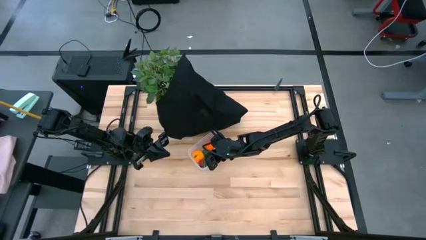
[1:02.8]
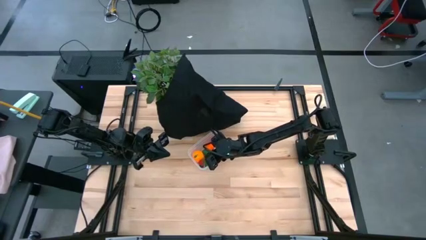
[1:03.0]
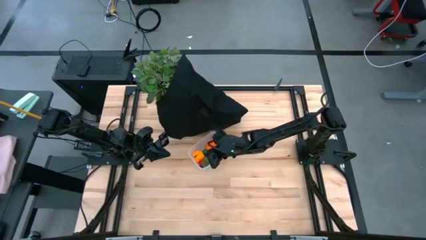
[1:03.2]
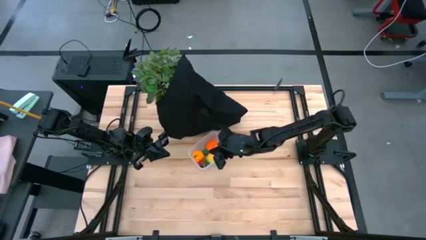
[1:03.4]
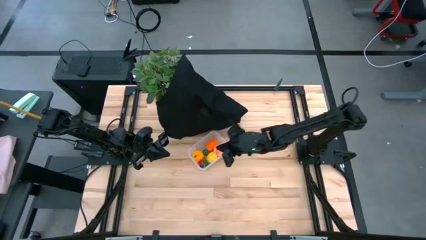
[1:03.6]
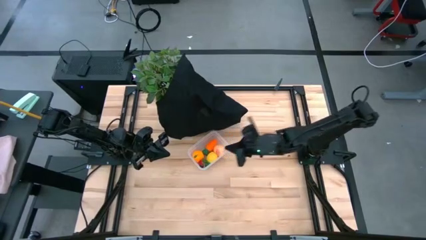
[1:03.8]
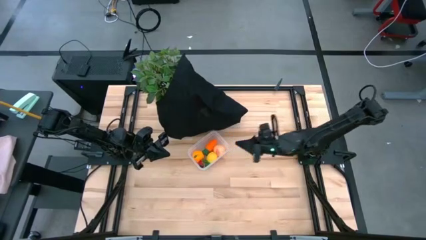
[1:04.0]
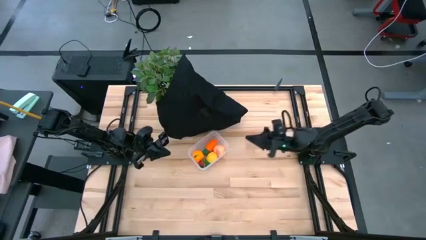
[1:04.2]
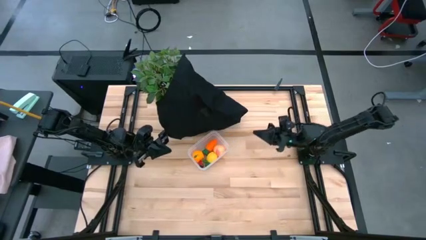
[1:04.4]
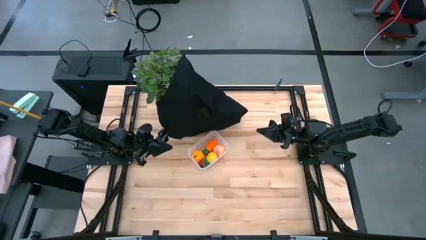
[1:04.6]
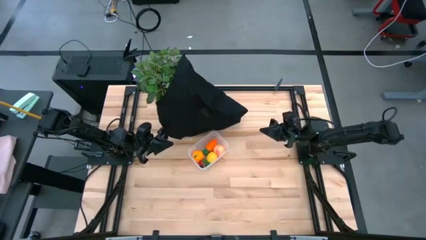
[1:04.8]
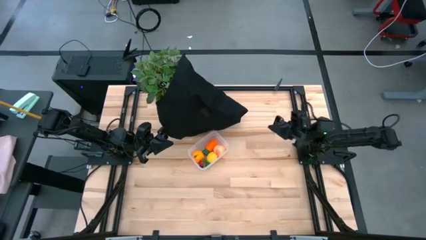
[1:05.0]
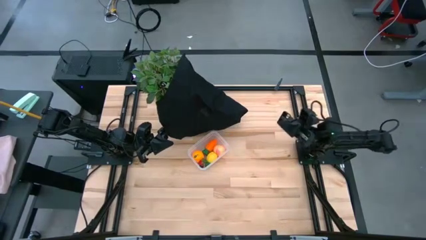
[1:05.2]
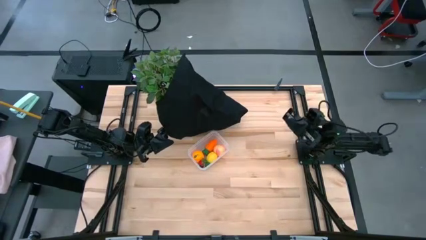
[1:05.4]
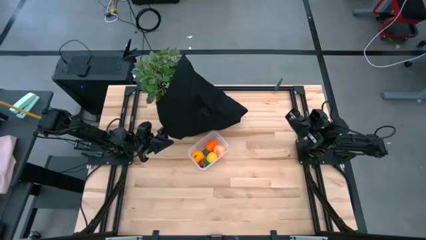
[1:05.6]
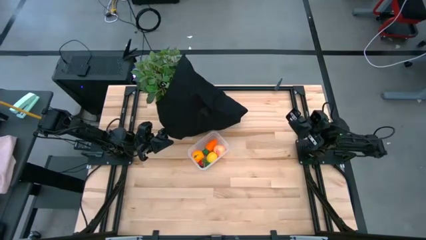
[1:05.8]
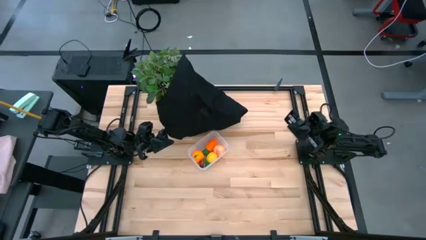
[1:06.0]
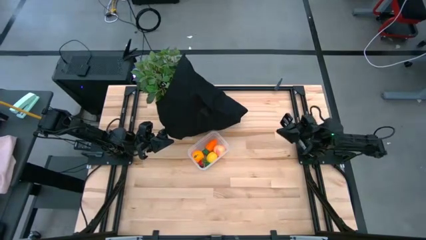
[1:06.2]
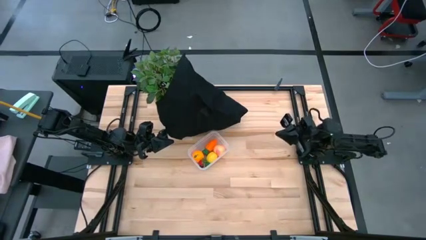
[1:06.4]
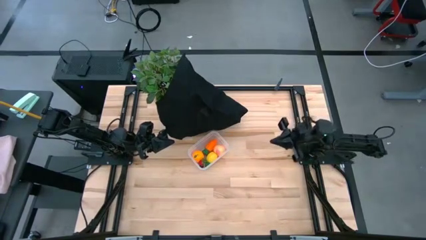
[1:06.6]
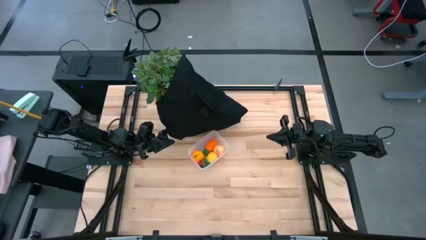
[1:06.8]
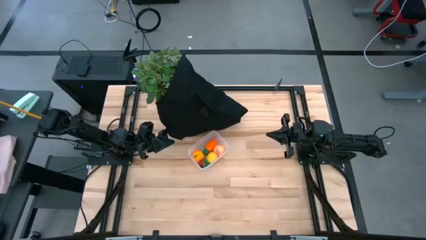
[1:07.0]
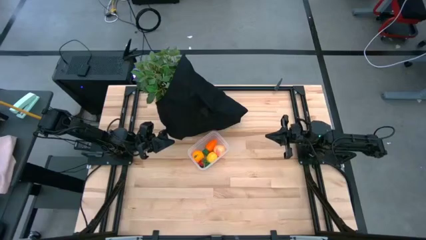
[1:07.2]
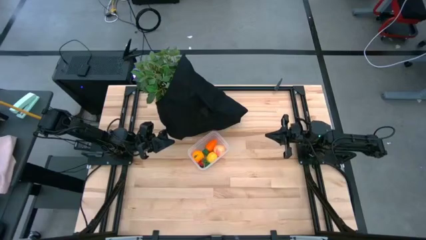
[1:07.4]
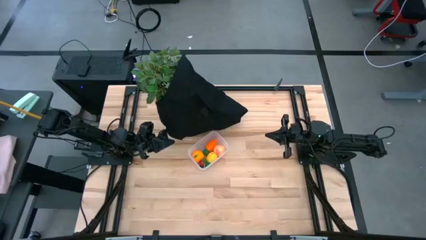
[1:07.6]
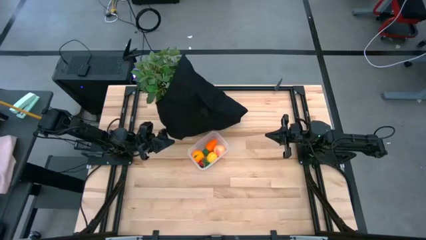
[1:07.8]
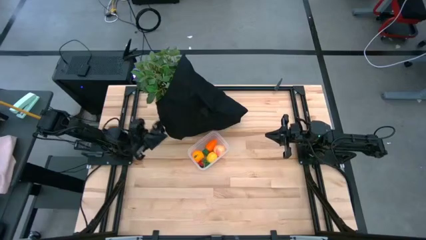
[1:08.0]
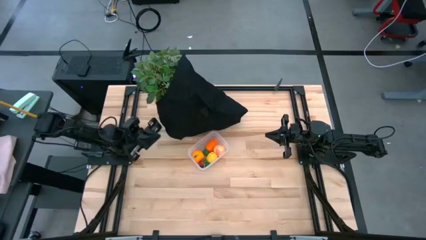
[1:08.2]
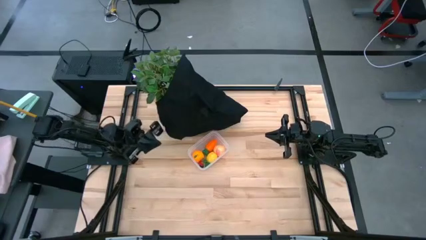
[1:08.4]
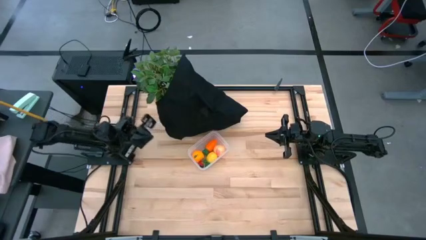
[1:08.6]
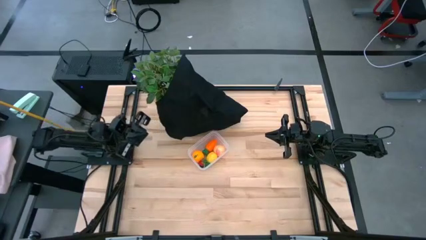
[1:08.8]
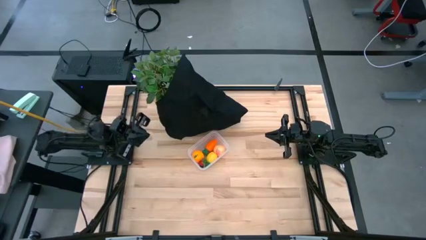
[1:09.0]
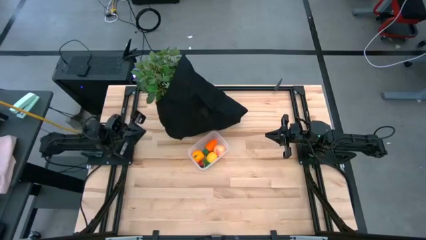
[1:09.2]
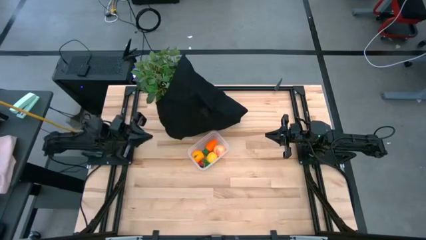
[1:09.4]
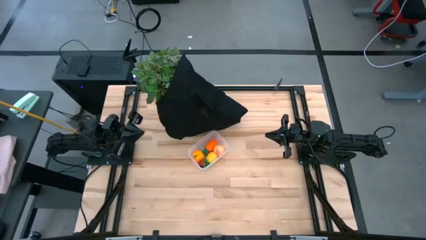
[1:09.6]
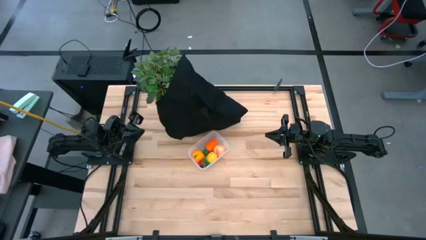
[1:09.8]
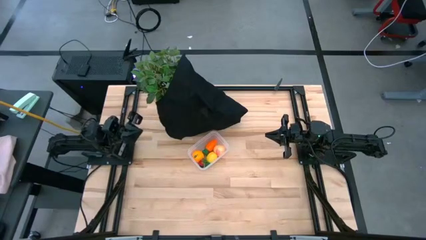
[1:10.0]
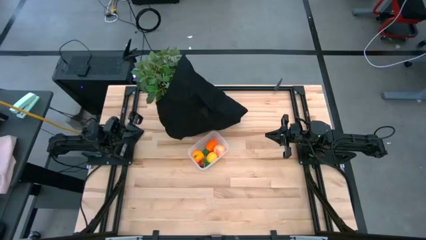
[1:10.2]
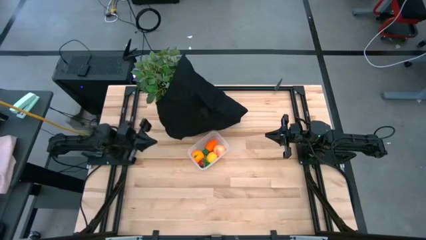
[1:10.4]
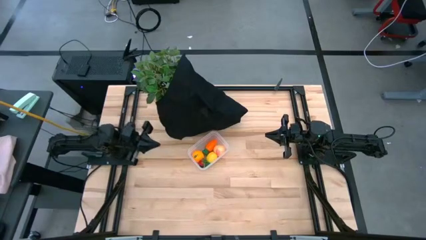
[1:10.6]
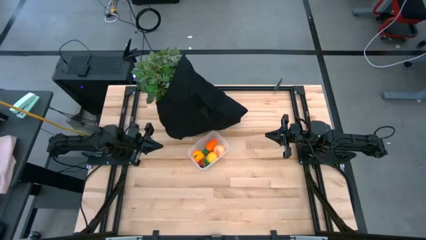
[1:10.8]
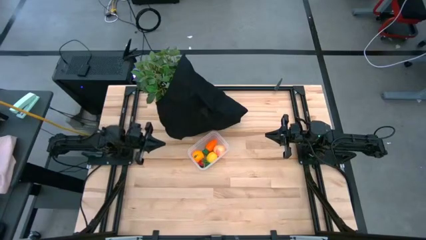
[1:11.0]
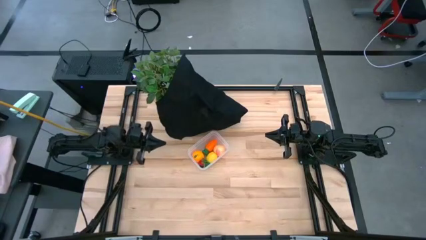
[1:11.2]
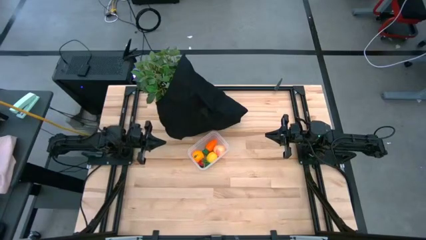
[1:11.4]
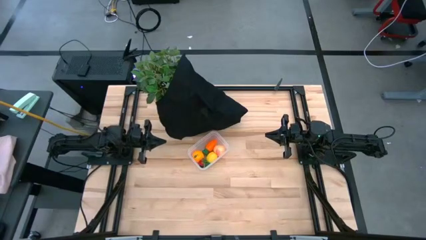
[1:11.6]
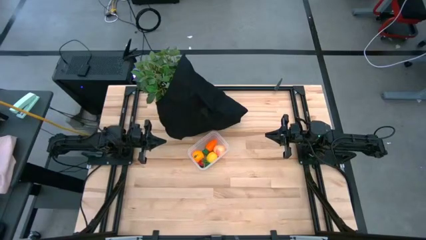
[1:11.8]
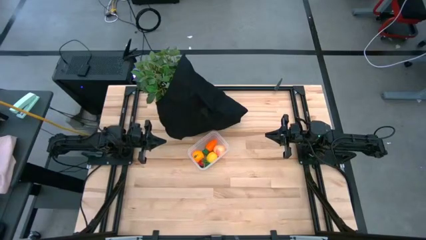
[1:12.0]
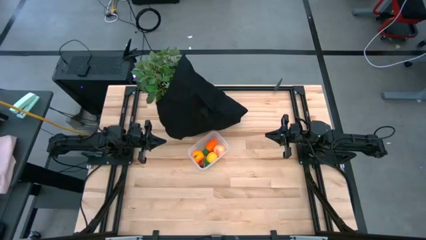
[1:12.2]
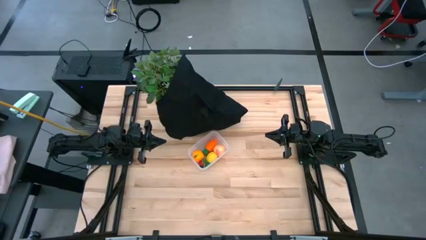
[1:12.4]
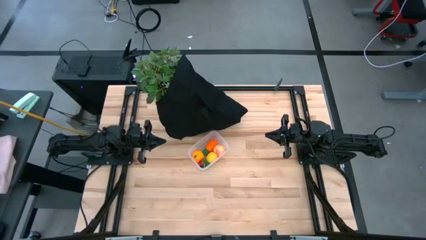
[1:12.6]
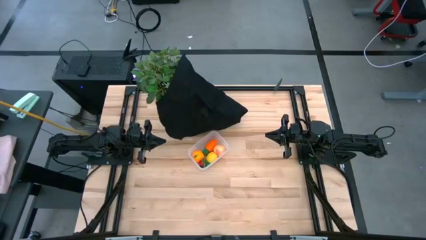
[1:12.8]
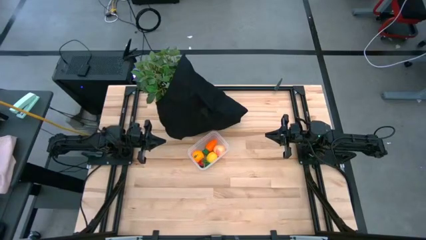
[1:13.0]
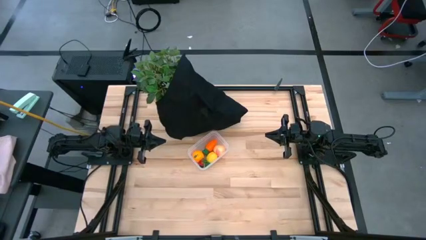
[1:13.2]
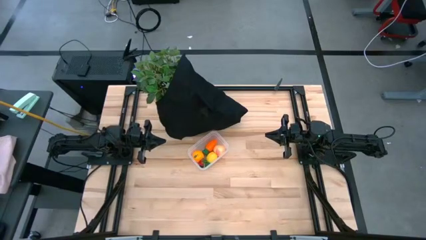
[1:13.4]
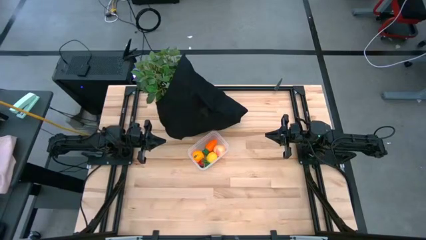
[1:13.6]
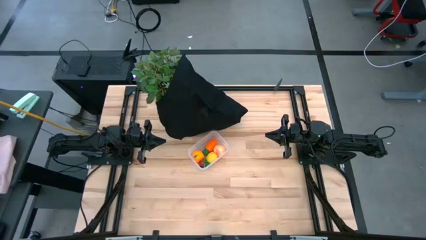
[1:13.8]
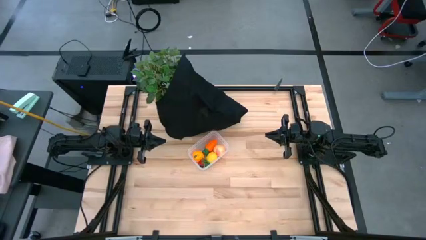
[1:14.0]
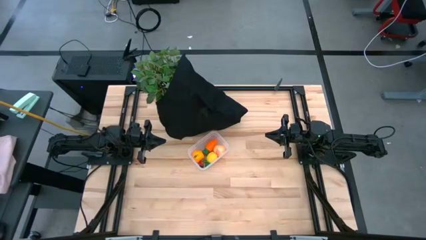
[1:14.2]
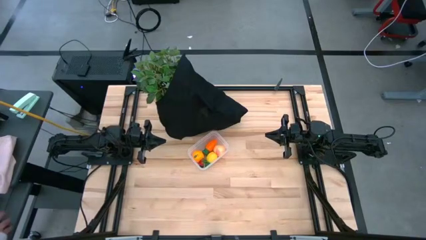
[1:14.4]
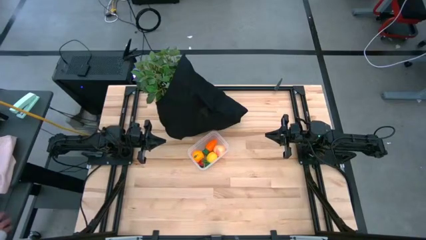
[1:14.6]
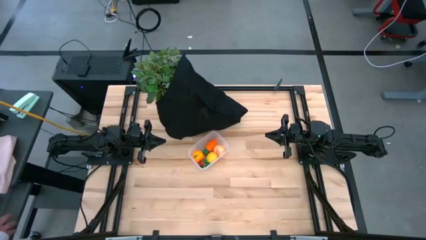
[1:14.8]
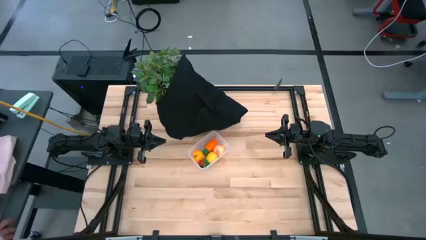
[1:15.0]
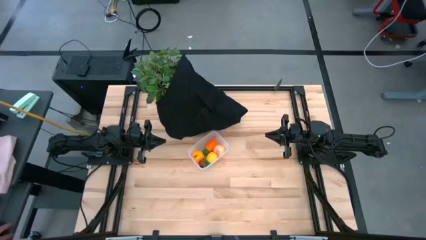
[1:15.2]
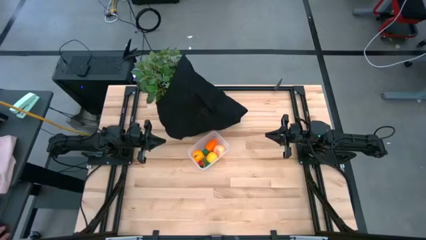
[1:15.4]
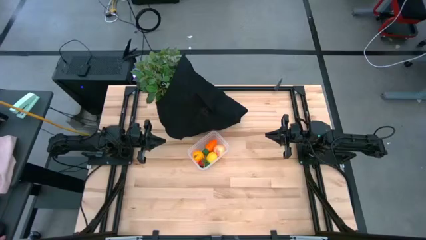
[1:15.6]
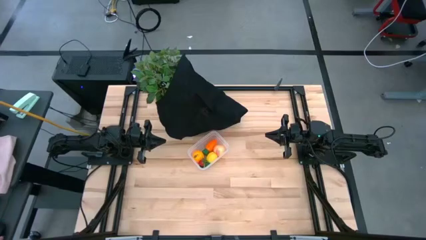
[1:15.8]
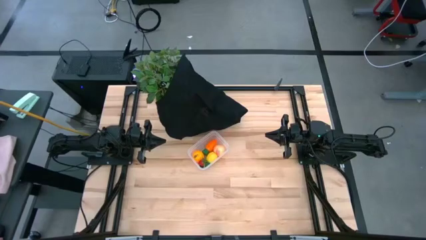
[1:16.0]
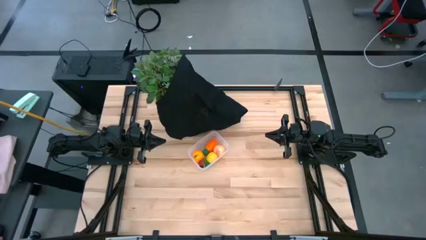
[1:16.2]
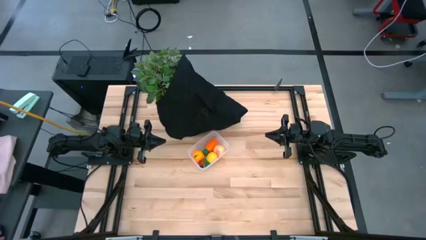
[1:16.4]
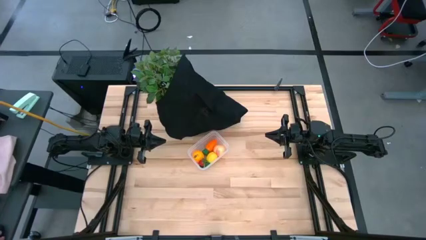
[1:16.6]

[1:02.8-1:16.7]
Task: Pick and placing Produce into tupperware
Return to Home Position
